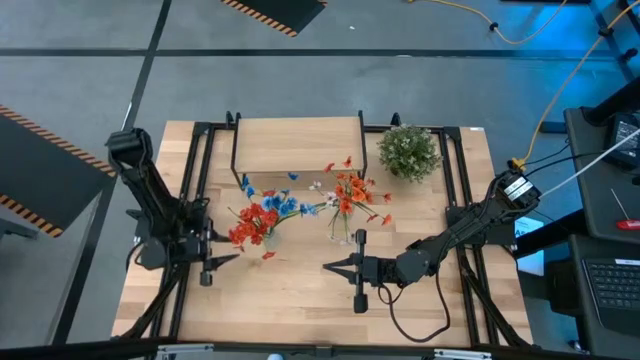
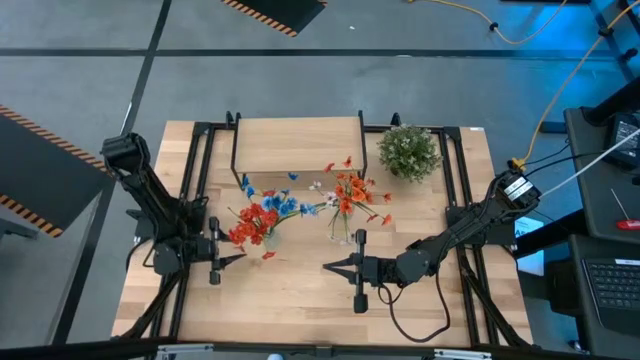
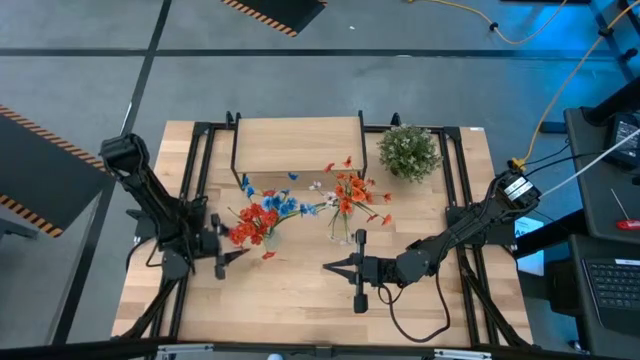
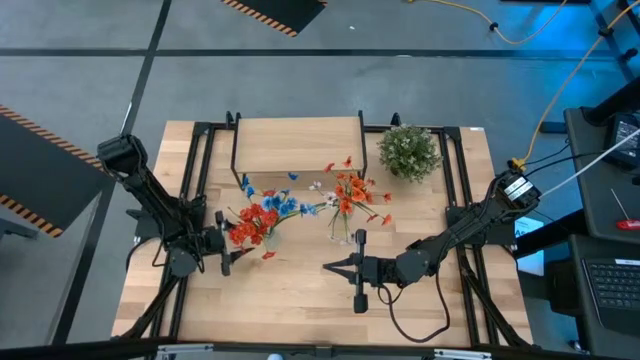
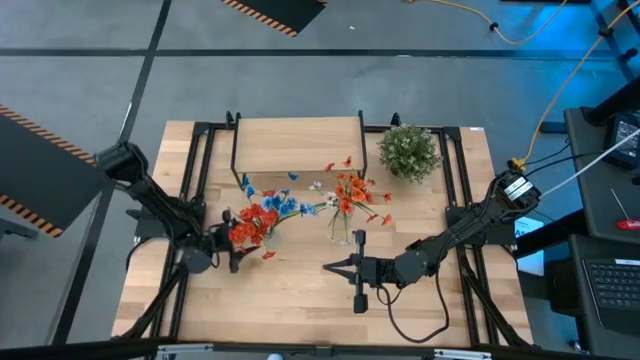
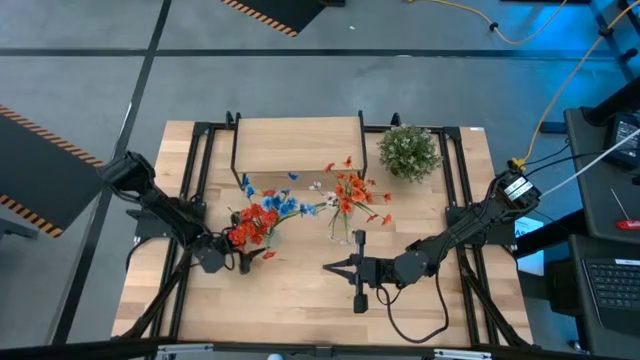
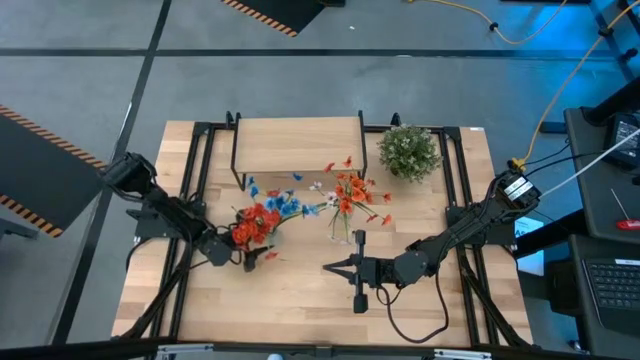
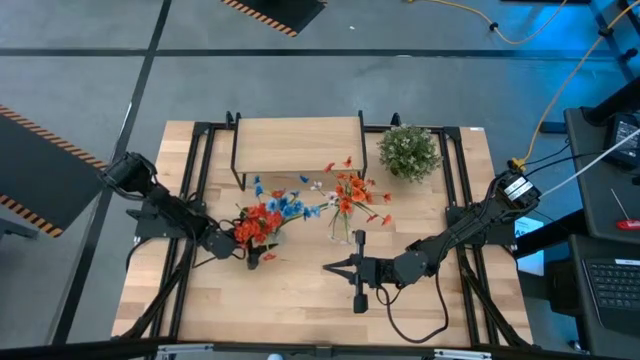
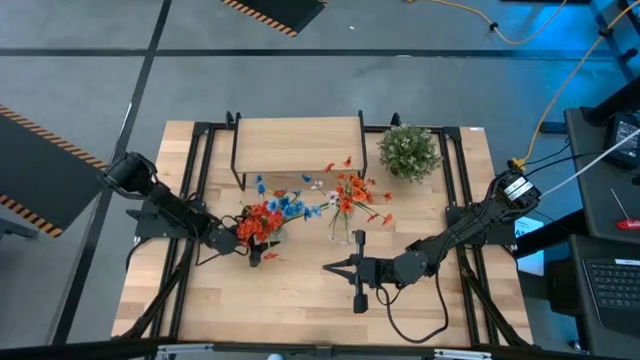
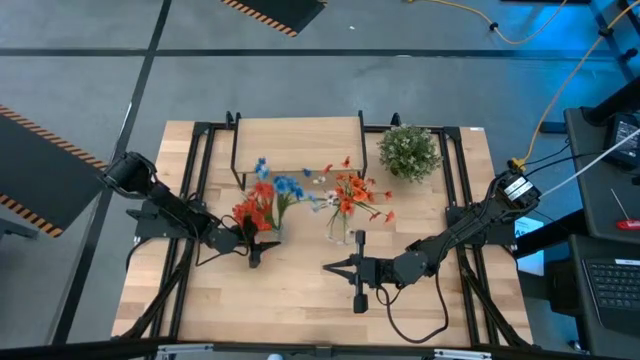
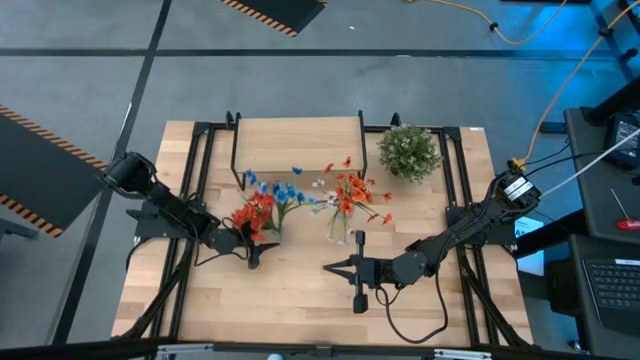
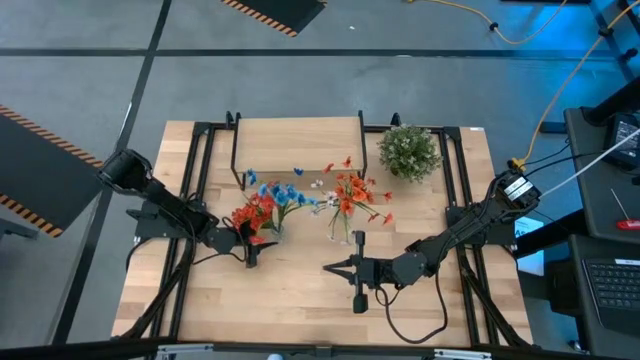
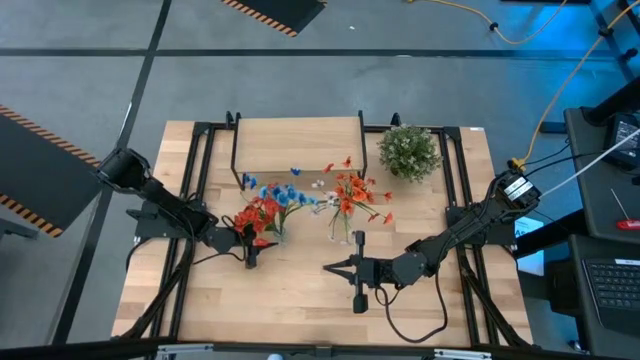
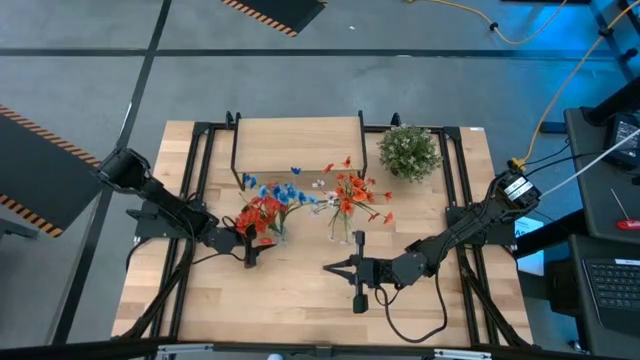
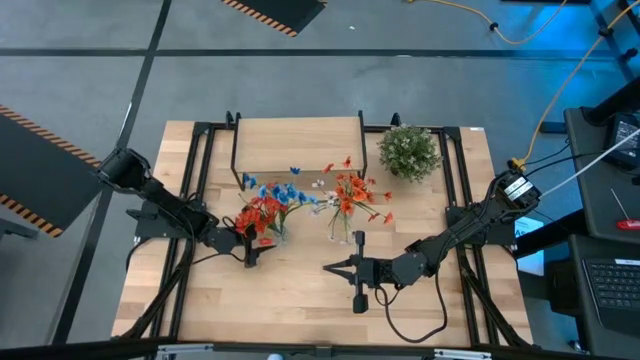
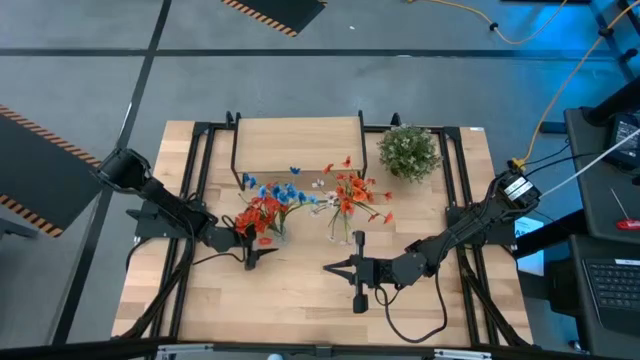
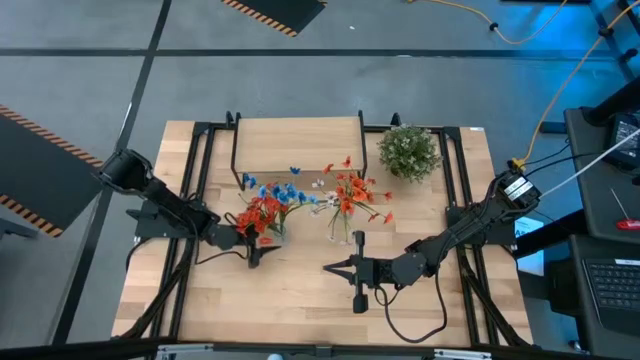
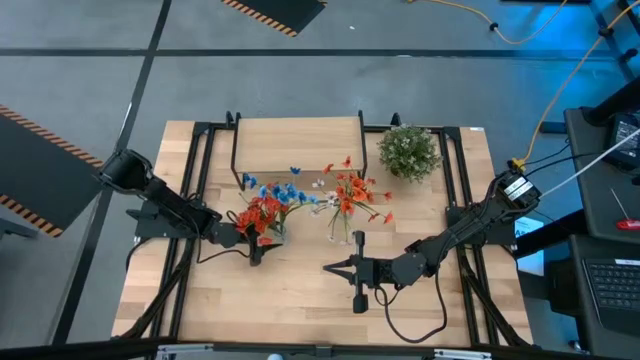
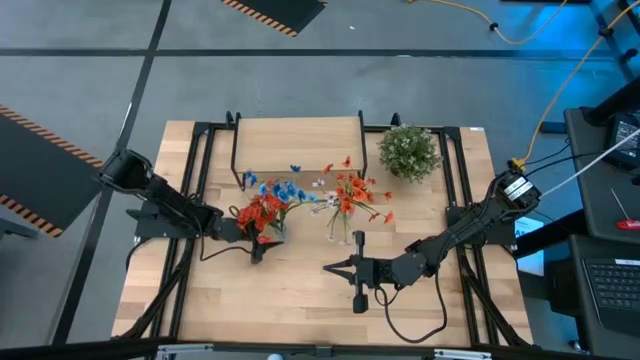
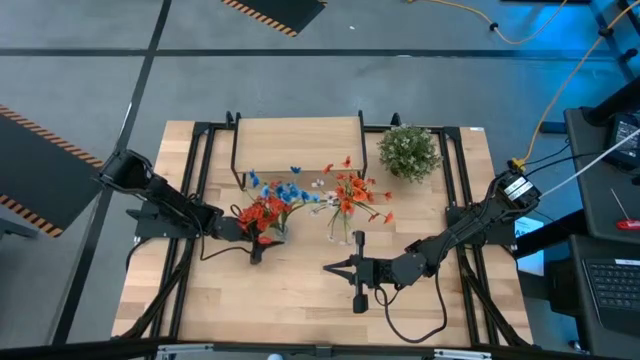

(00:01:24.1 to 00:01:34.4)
Task: Pick and place flowers into a vace then onto a shelf
Put the left transparent vase on the shelf

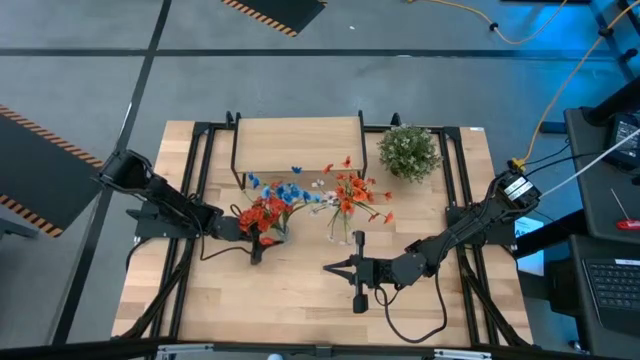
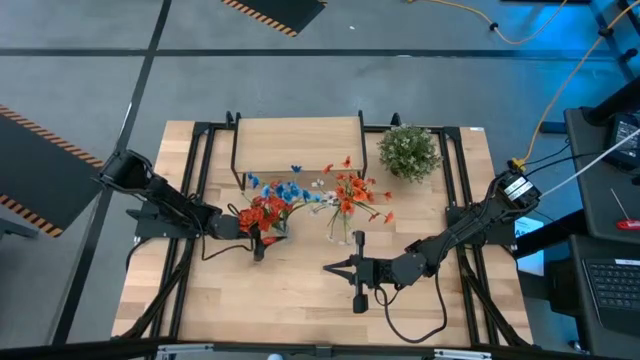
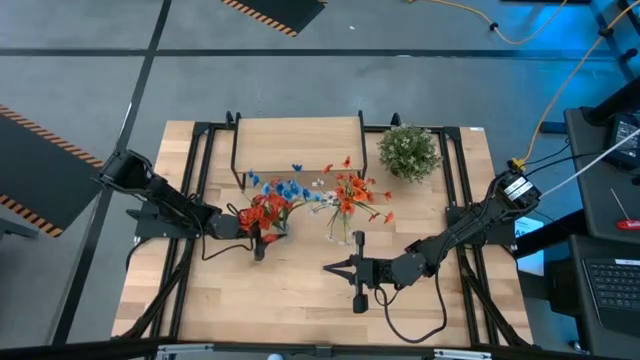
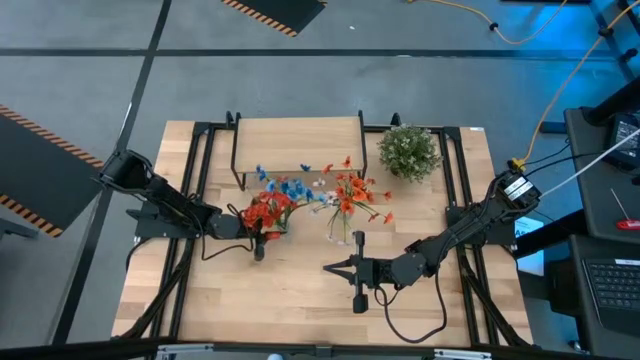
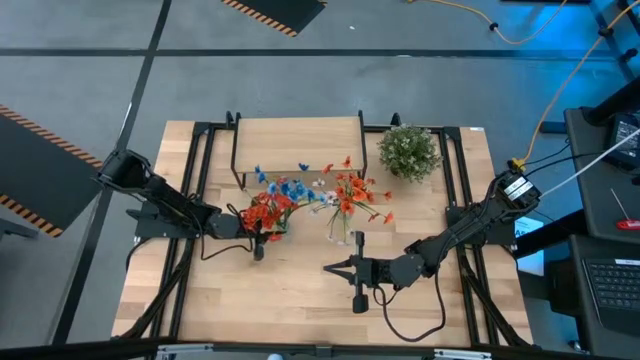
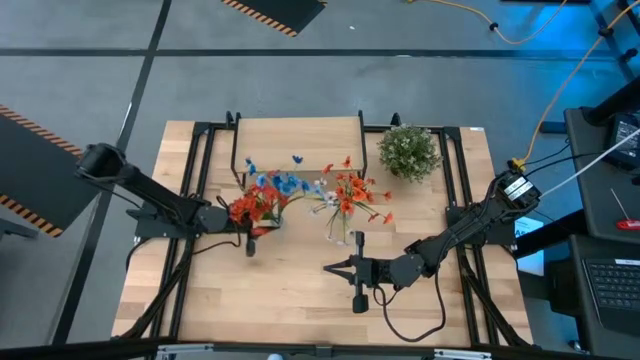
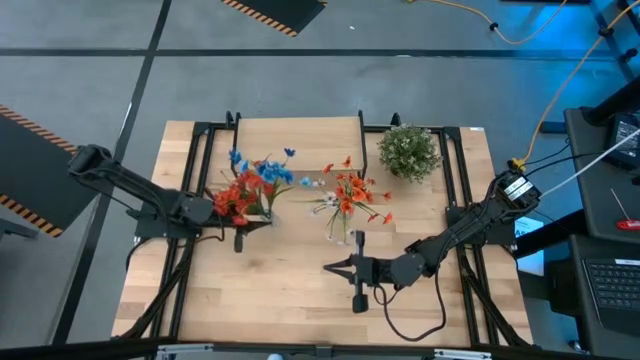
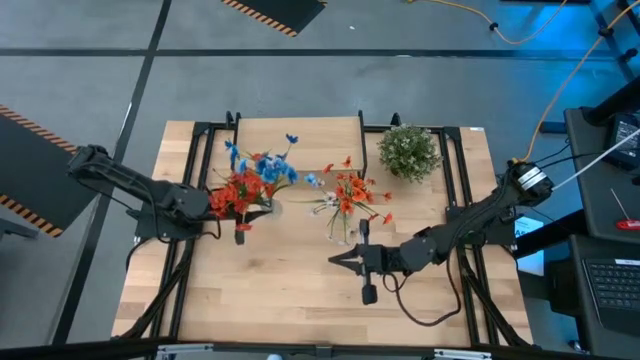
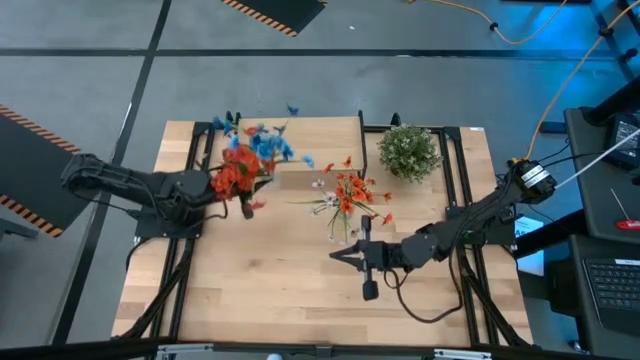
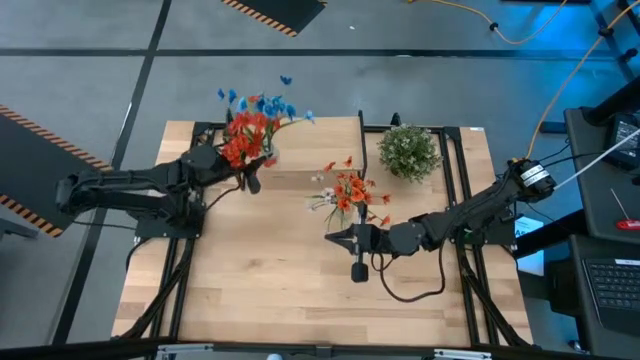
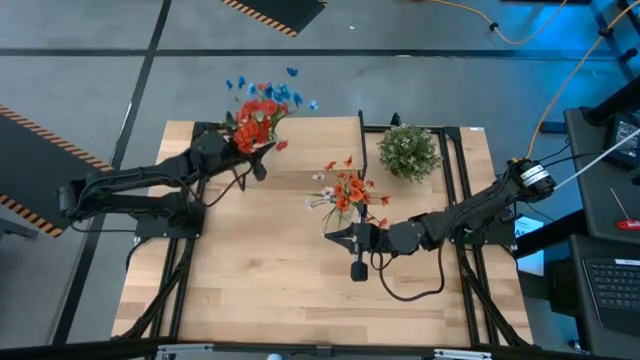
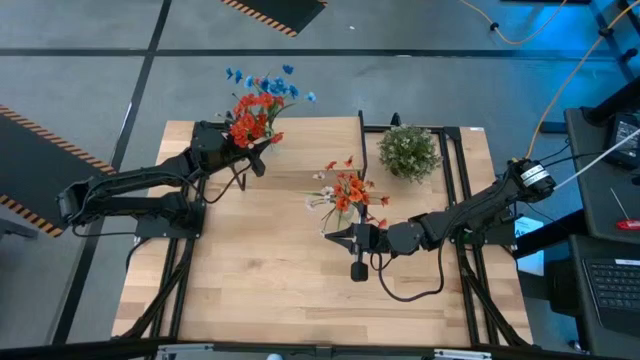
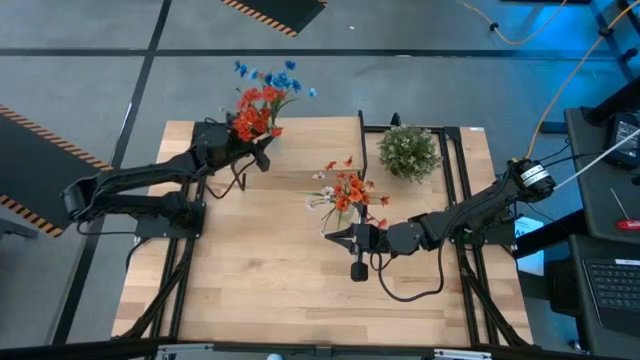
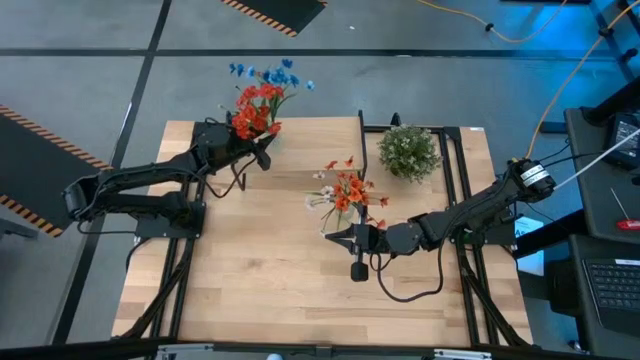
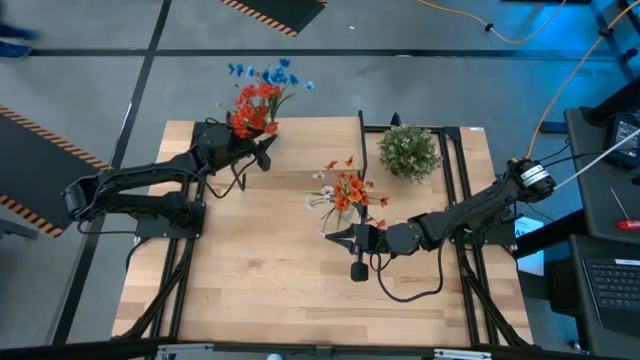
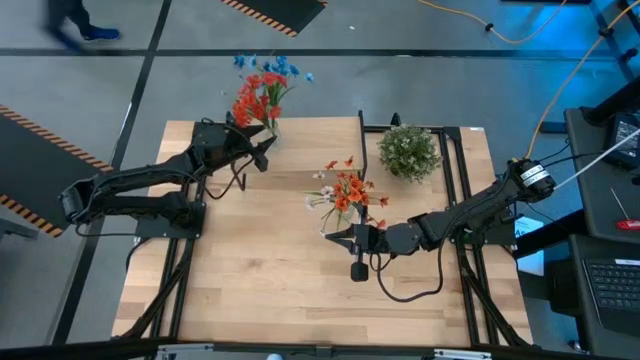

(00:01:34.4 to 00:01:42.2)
Put the left transparent vase on the shelf

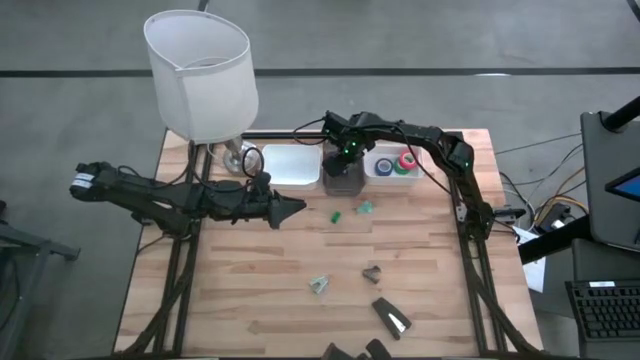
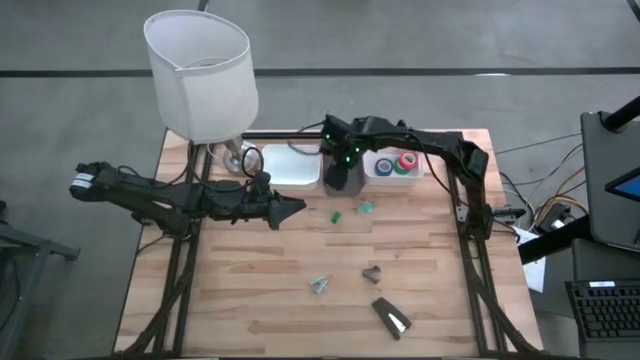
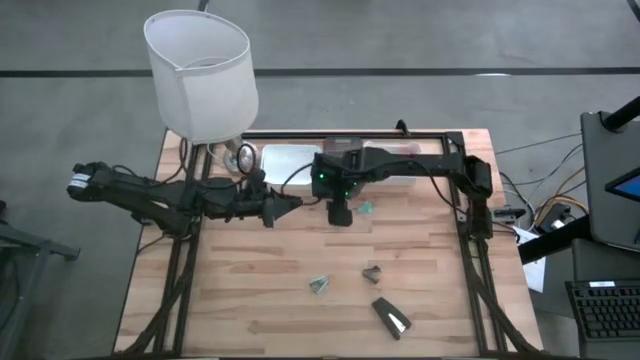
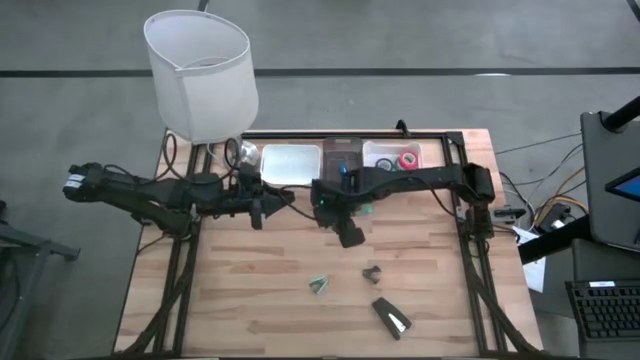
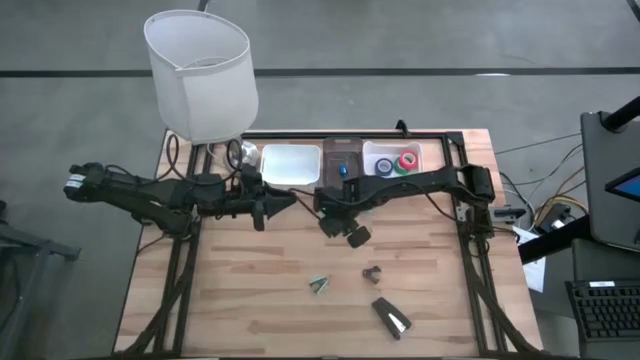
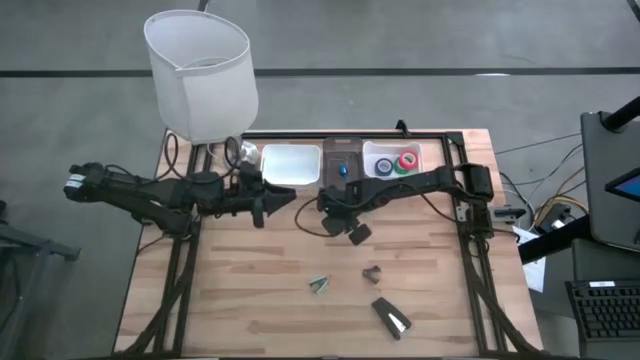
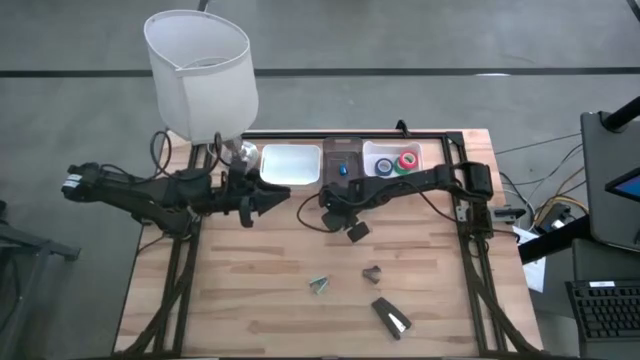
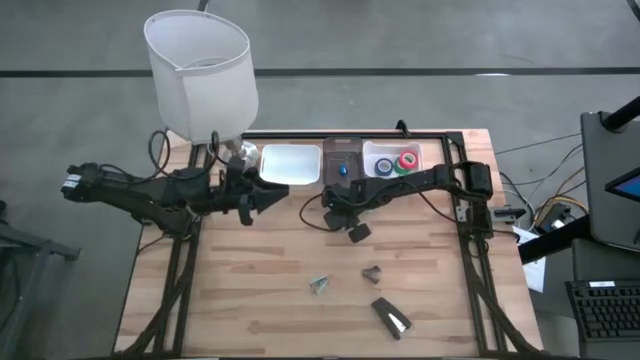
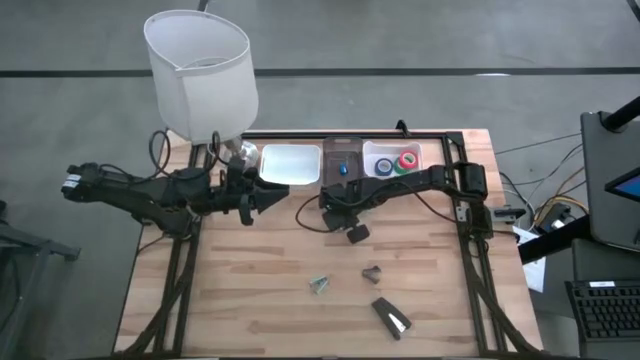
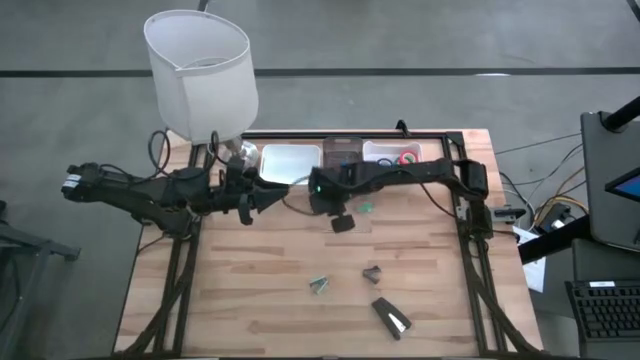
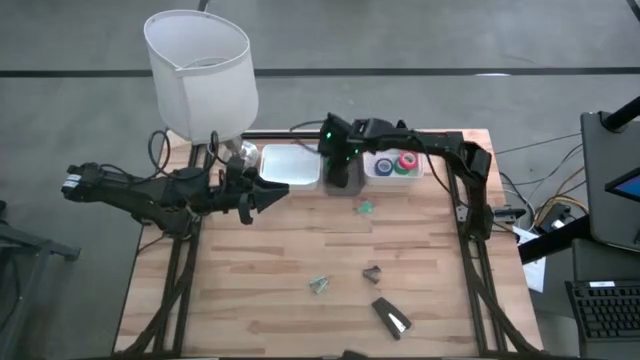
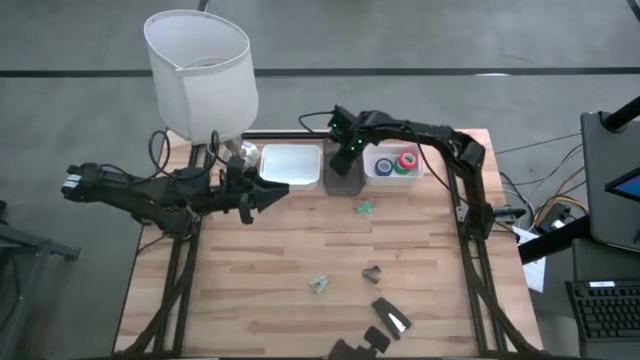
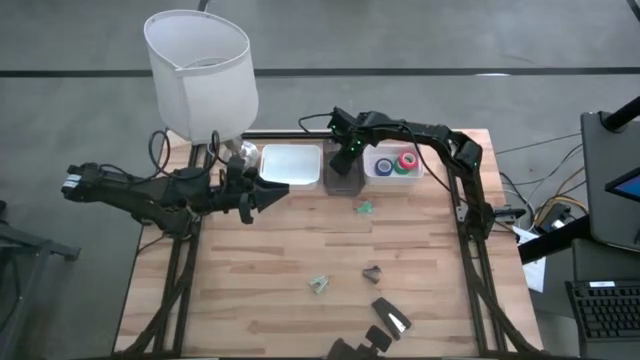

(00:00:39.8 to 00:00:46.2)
Task: Pick and place Stapler, Stapler remover, tape
Put the green stapler into the black transparent bin
